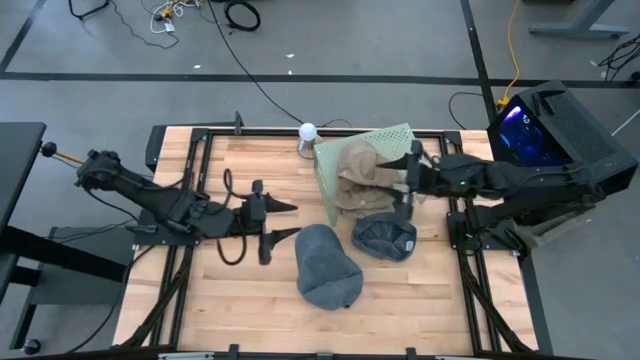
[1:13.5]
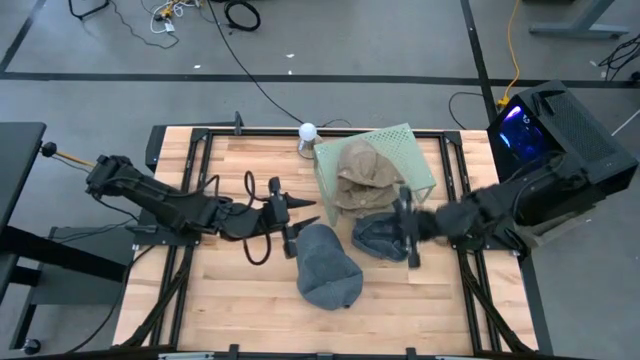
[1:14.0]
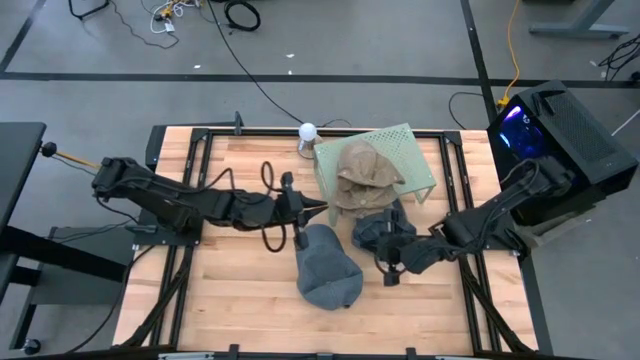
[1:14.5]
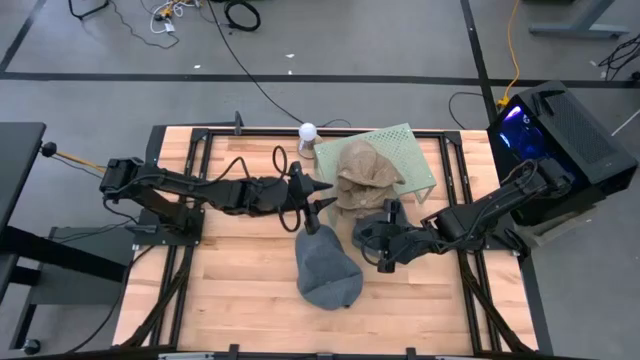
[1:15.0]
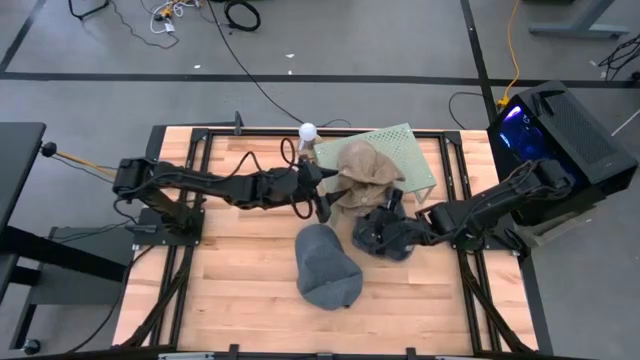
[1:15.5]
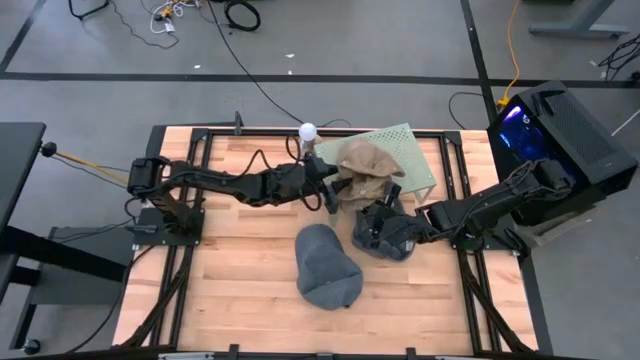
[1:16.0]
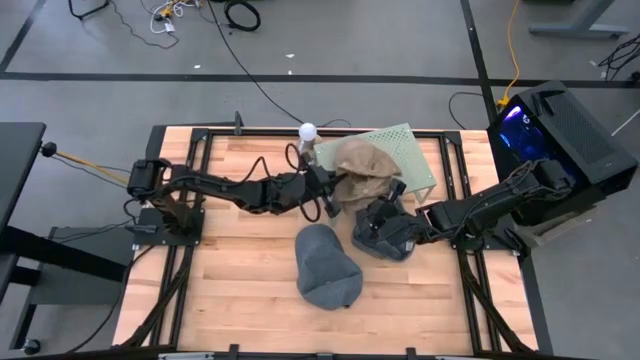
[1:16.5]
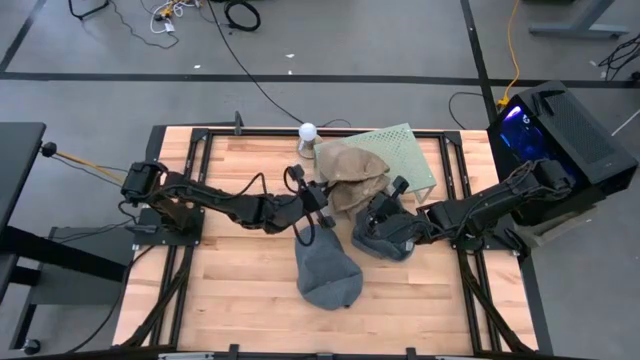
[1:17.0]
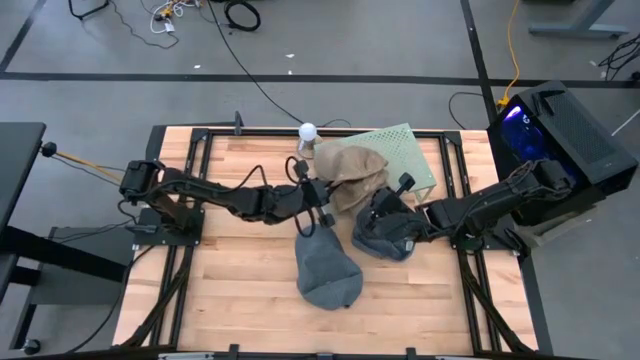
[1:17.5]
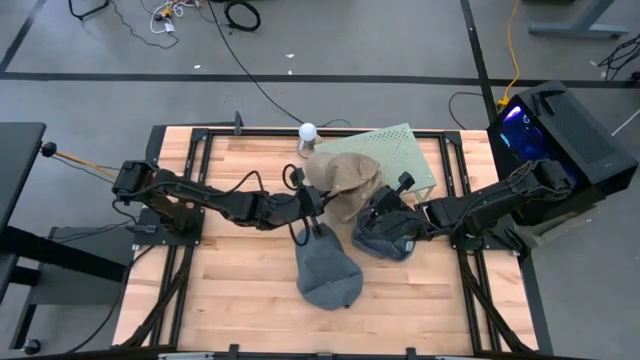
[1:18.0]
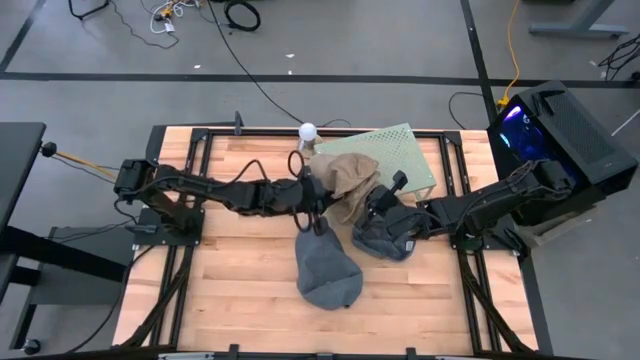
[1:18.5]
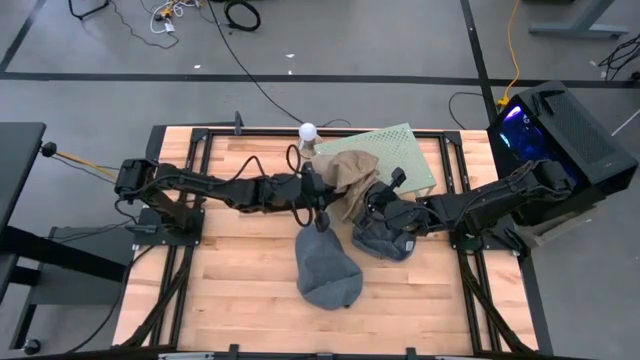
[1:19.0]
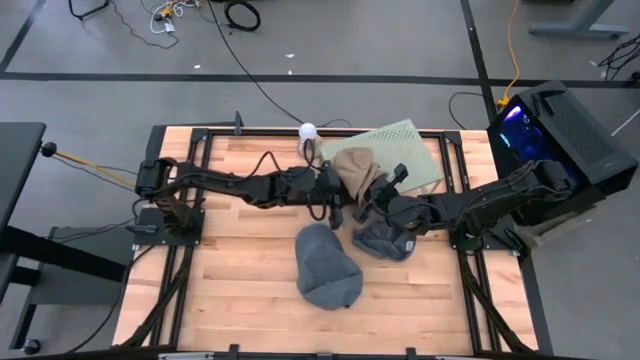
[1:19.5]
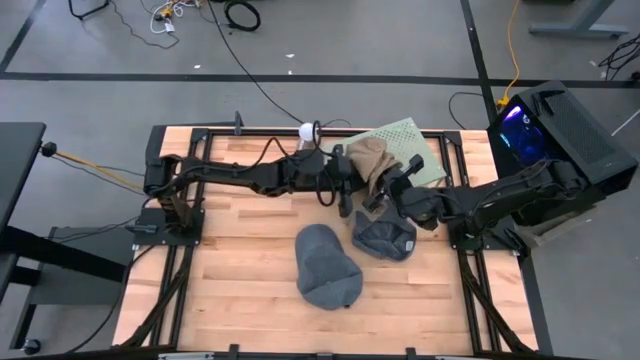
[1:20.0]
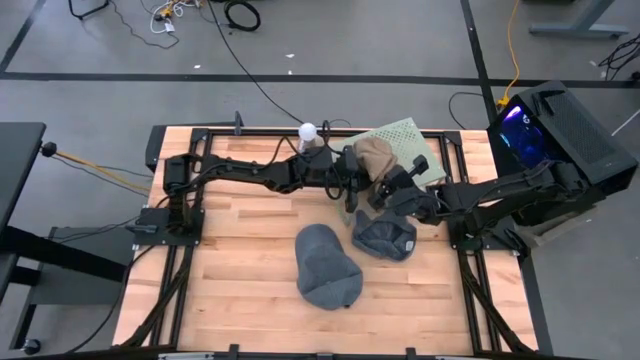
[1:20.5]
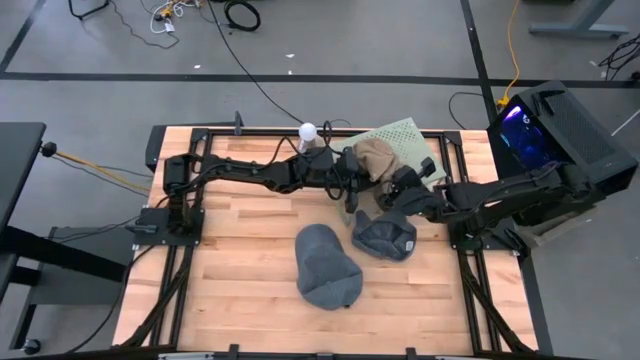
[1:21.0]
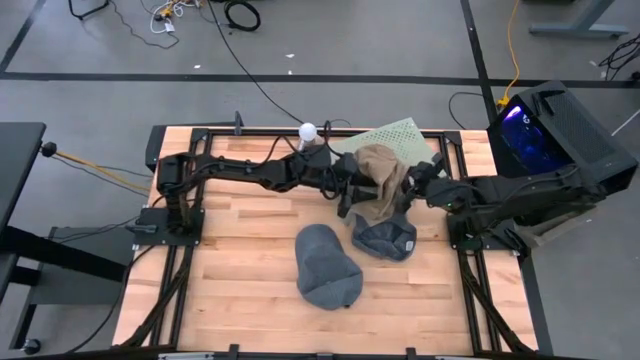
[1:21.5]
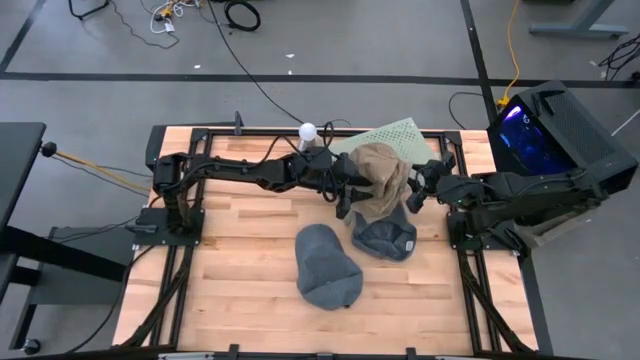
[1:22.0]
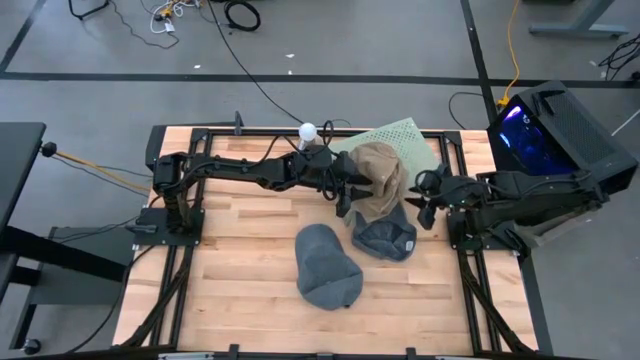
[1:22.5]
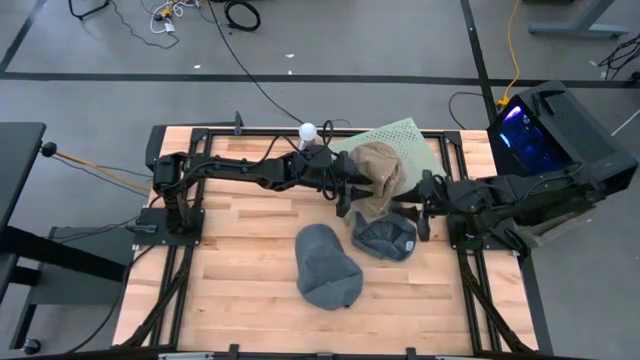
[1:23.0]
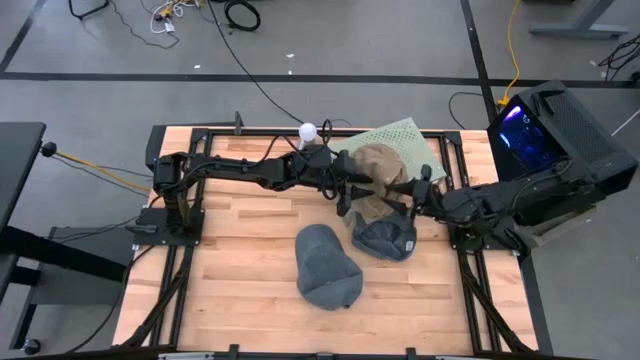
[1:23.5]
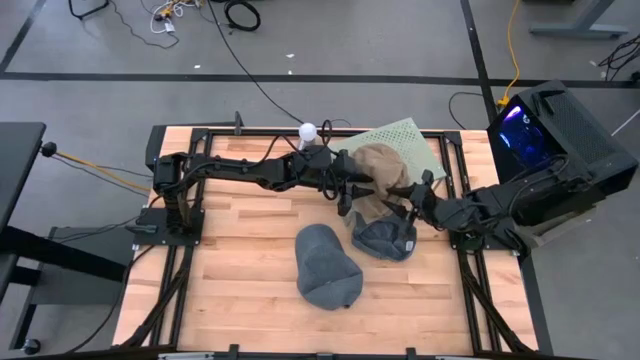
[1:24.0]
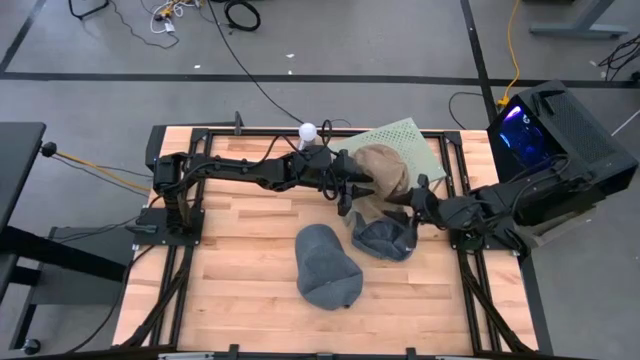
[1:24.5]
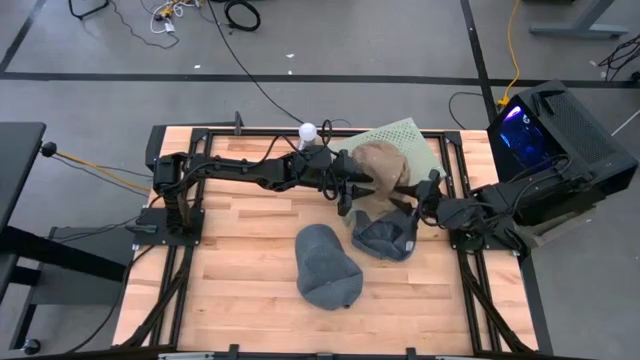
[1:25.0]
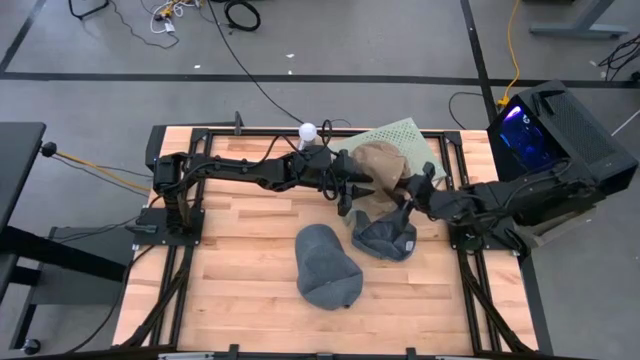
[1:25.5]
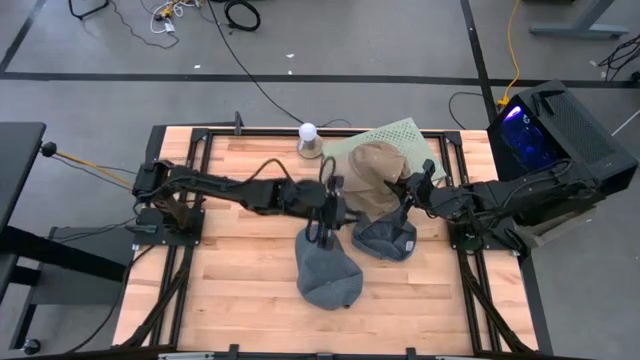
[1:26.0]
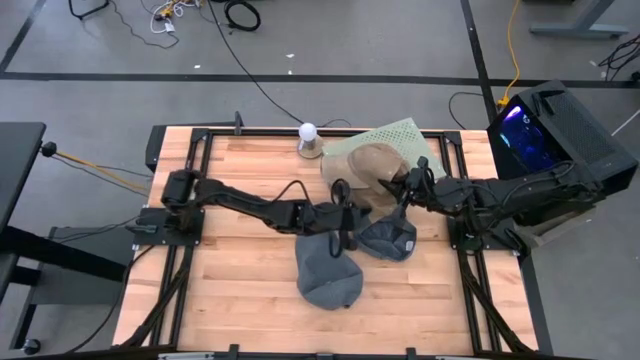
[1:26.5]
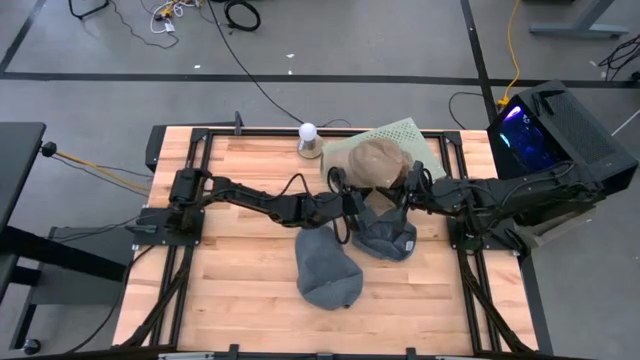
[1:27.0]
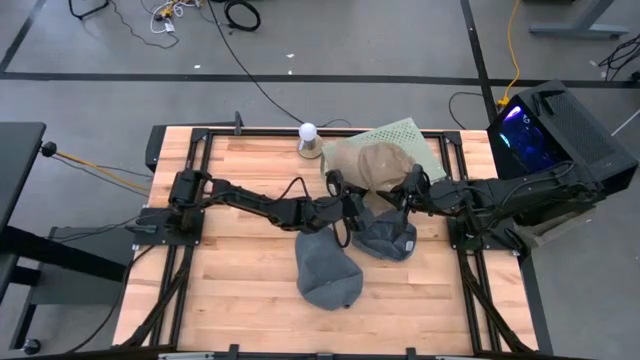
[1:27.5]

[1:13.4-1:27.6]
Task: Stack caps on shelf
Adjust the brown caps

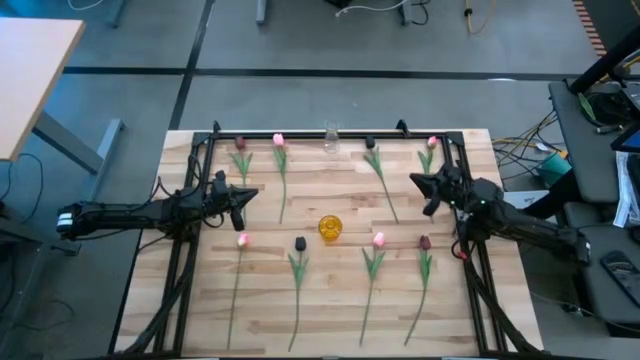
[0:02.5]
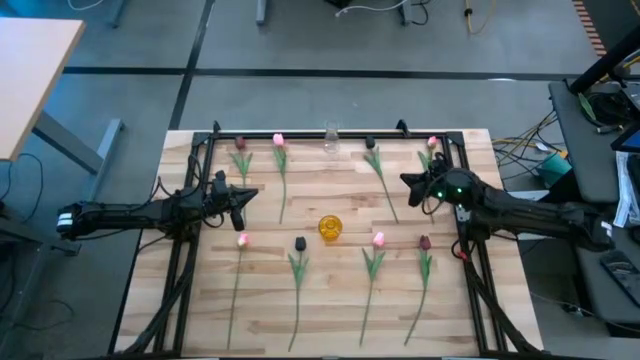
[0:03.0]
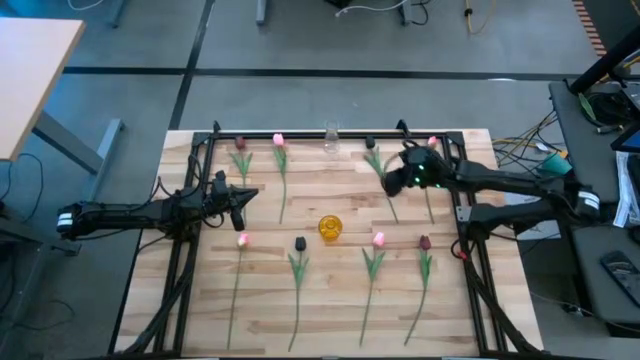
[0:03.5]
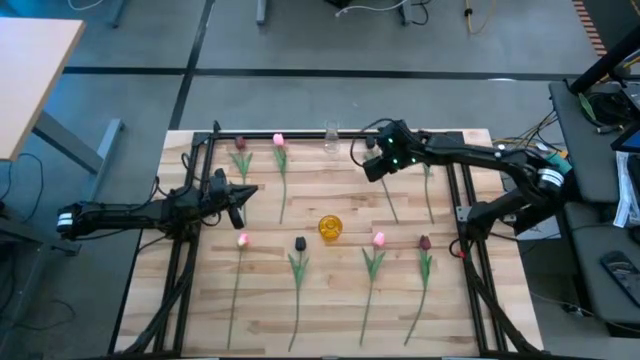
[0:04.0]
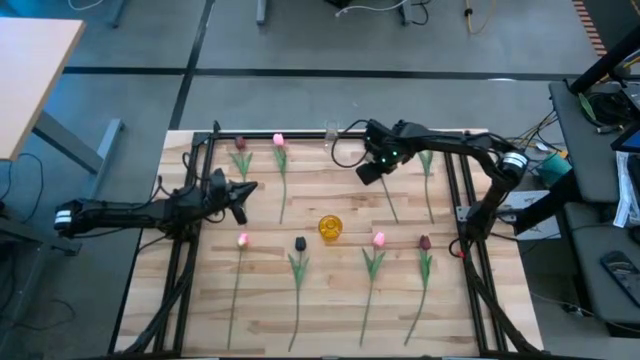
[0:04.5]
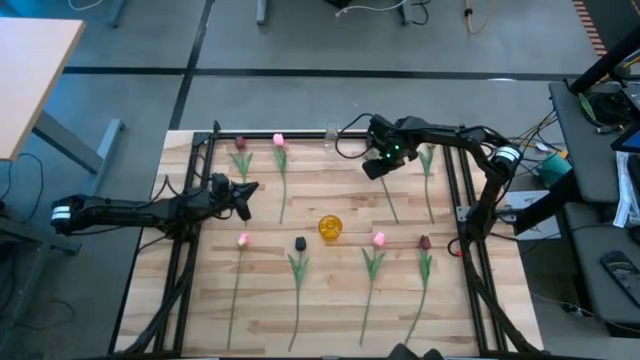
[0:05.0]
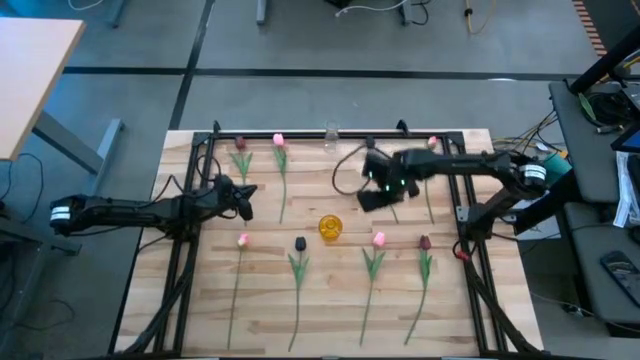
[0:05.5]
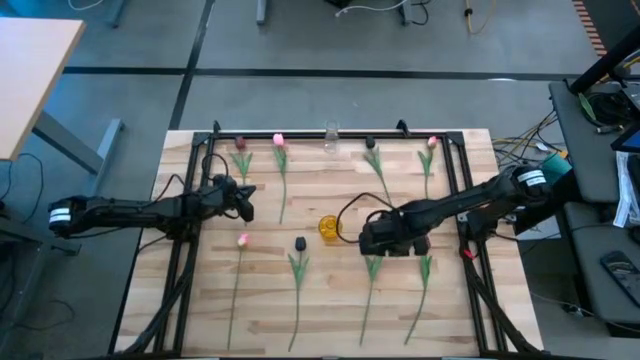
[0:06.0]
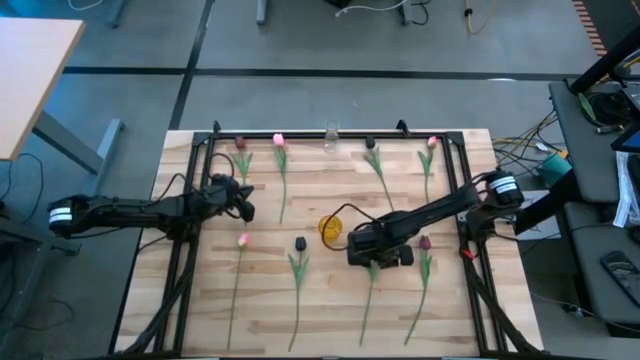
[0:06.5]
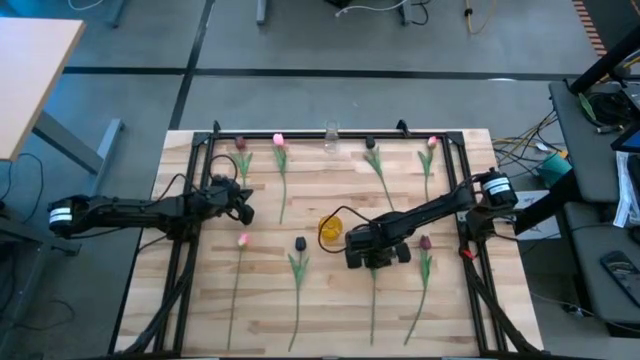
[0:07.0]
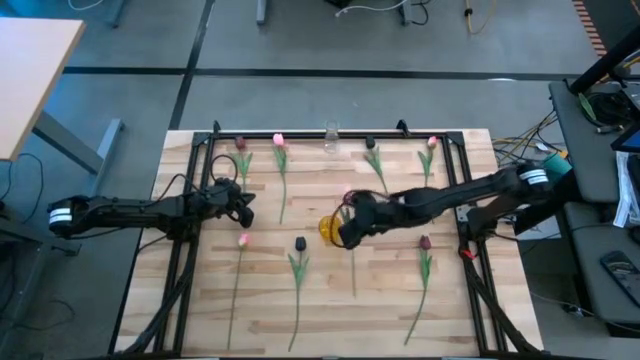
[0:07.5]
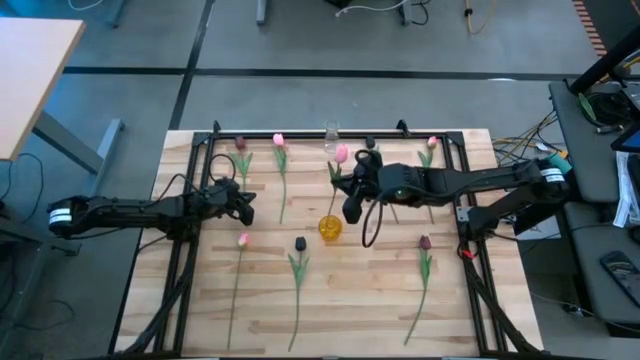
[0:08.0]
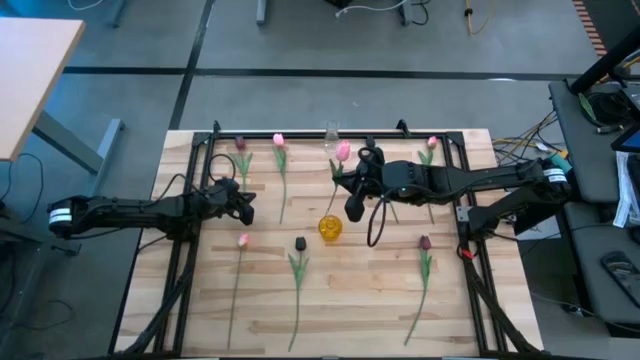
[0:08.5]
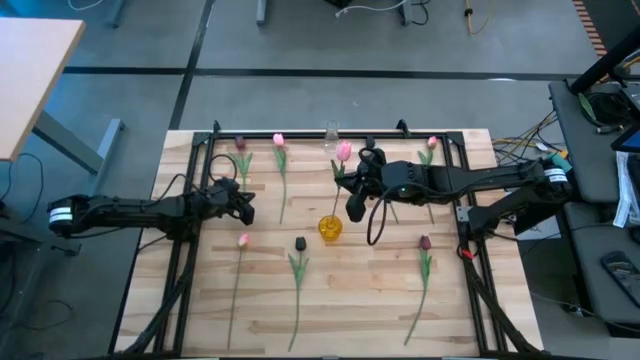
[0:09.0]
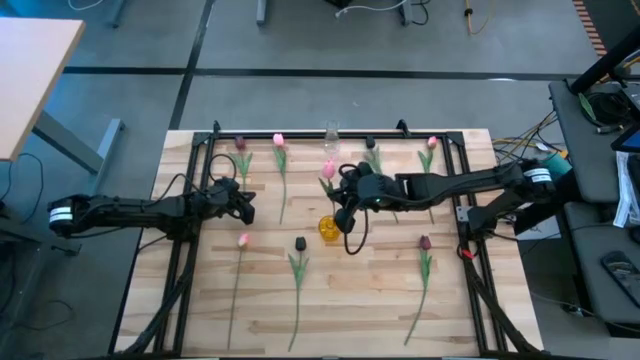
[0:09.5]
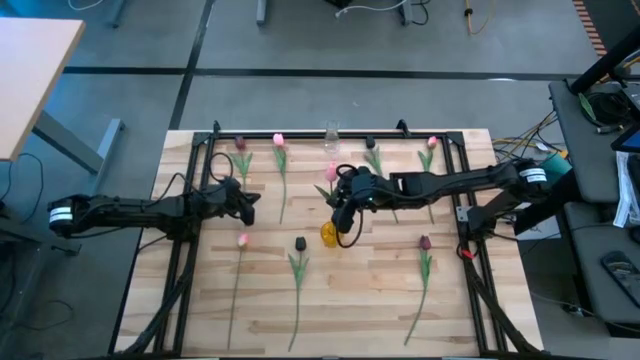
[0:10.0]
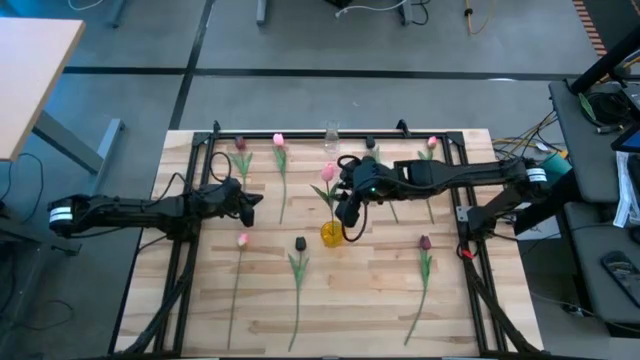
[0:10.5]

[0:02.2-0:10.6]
Task: Sort flowers into vase by color
Put the tulip into the yellow vase
